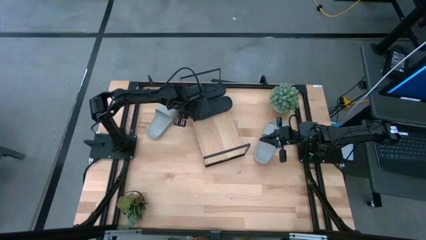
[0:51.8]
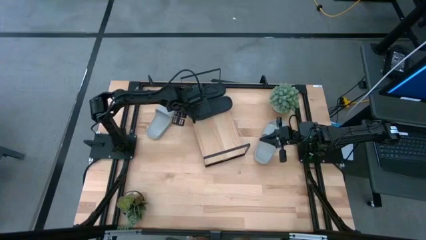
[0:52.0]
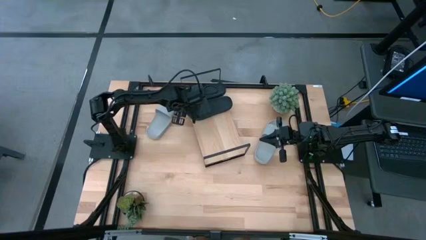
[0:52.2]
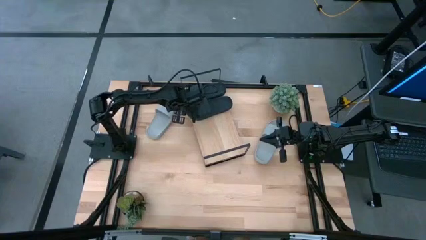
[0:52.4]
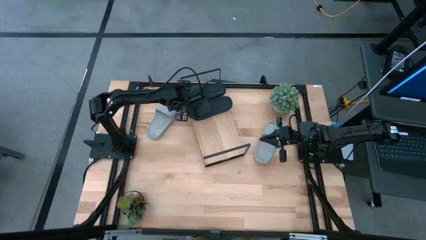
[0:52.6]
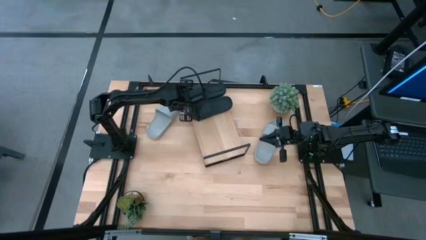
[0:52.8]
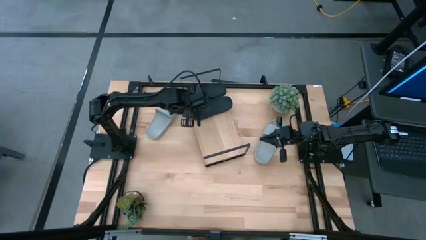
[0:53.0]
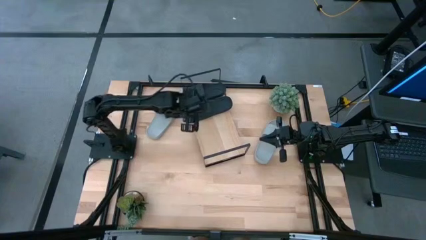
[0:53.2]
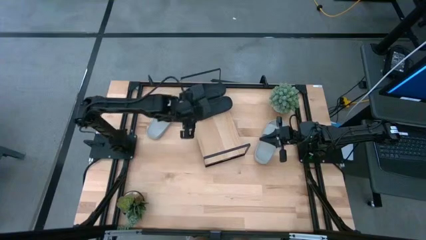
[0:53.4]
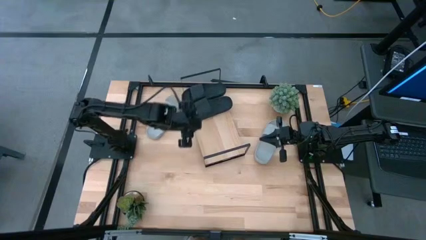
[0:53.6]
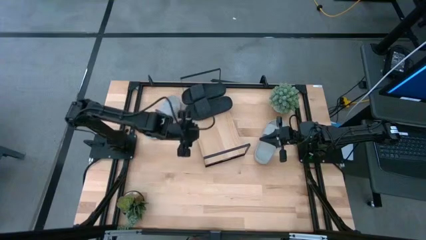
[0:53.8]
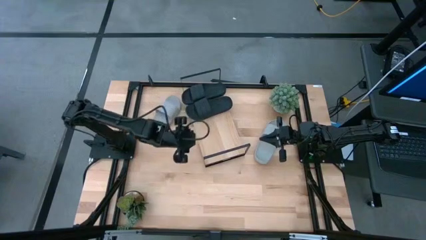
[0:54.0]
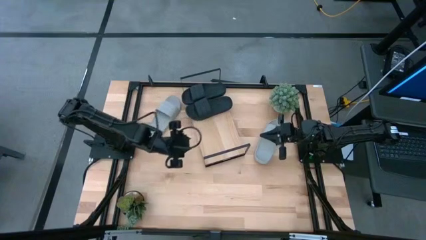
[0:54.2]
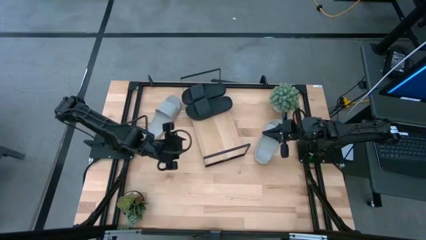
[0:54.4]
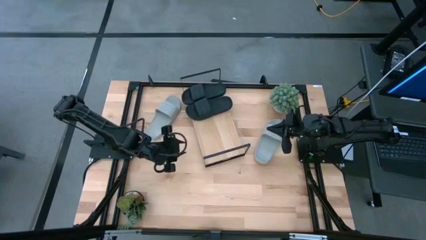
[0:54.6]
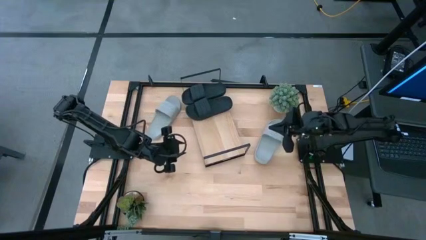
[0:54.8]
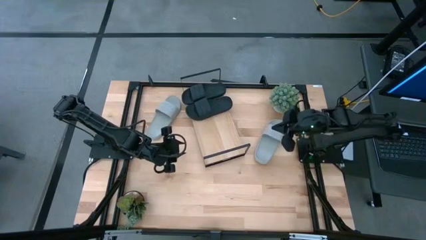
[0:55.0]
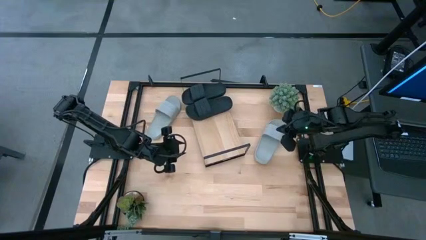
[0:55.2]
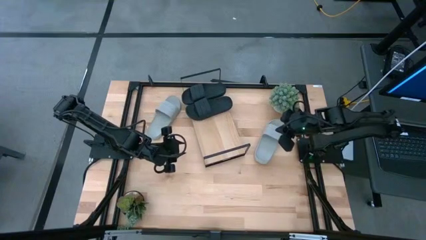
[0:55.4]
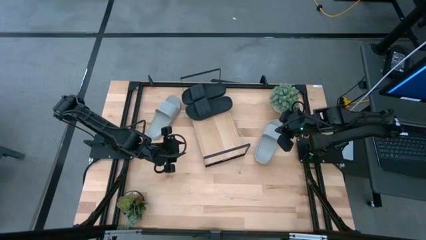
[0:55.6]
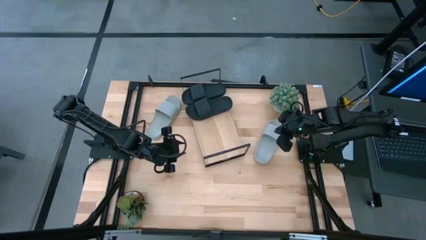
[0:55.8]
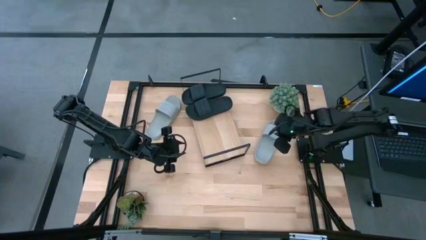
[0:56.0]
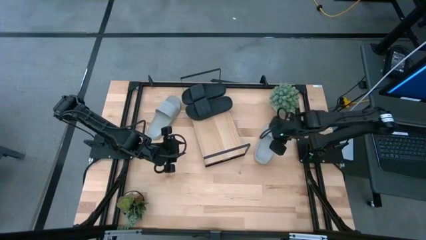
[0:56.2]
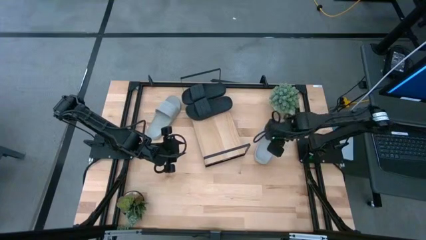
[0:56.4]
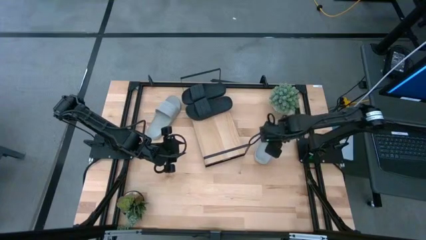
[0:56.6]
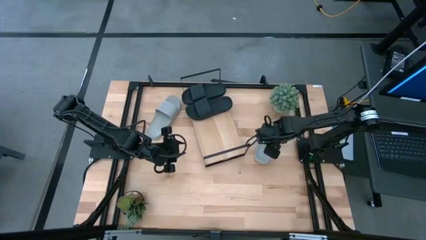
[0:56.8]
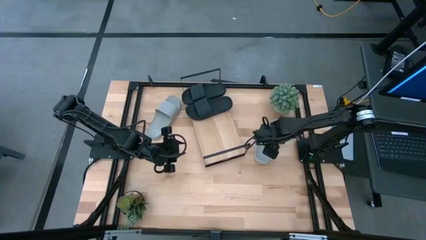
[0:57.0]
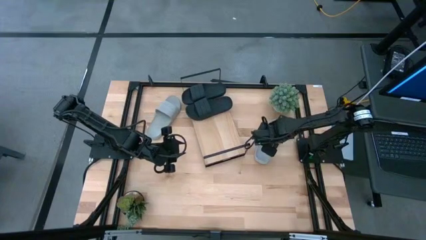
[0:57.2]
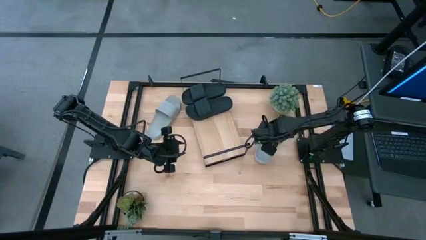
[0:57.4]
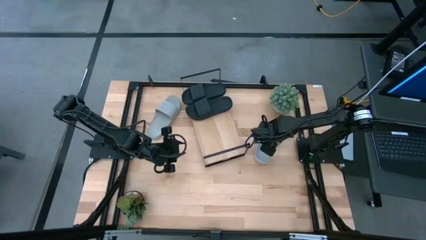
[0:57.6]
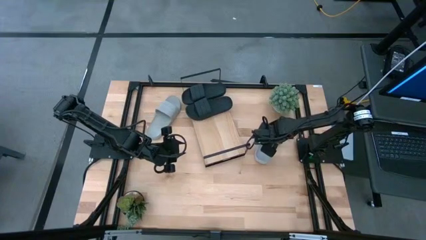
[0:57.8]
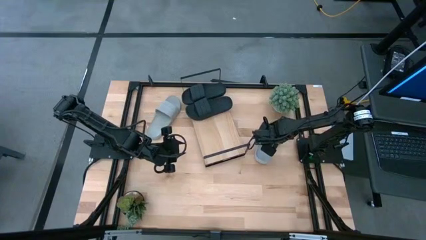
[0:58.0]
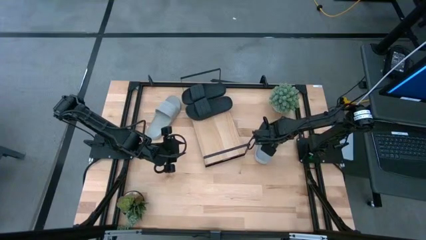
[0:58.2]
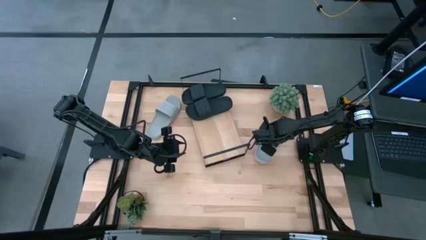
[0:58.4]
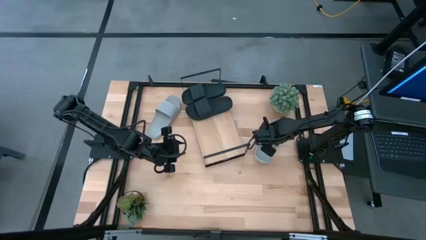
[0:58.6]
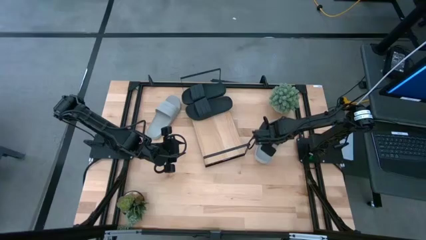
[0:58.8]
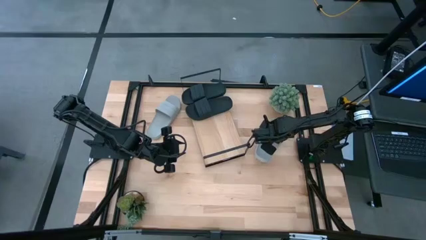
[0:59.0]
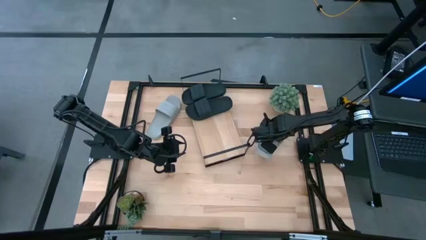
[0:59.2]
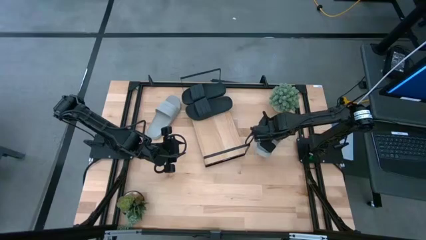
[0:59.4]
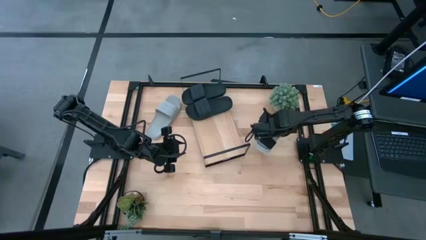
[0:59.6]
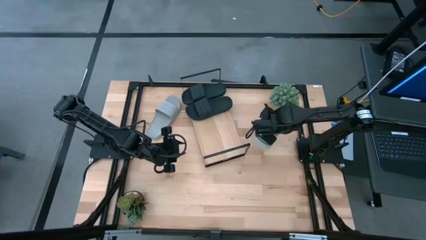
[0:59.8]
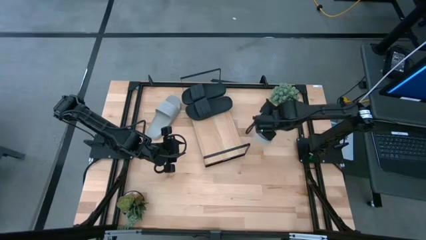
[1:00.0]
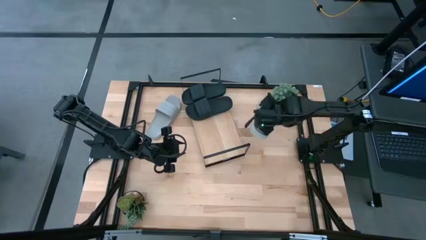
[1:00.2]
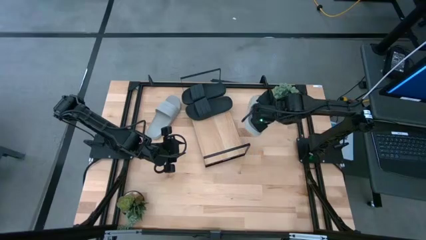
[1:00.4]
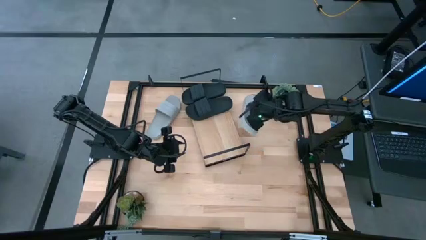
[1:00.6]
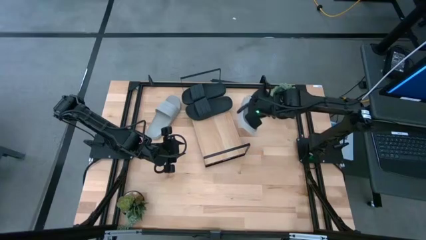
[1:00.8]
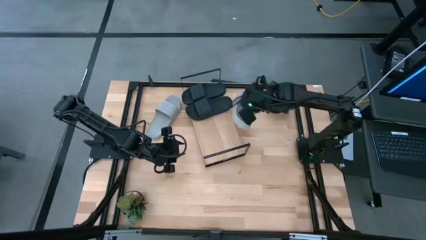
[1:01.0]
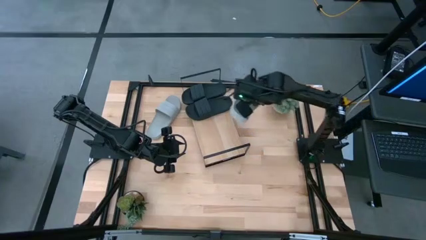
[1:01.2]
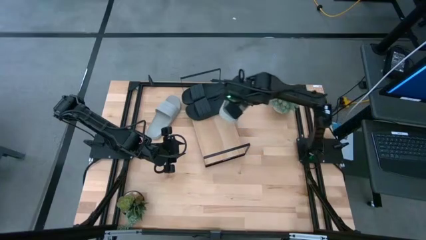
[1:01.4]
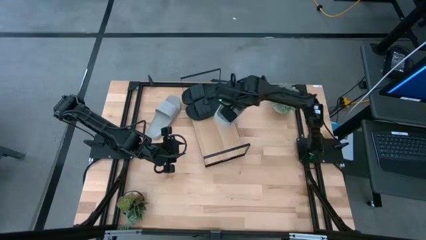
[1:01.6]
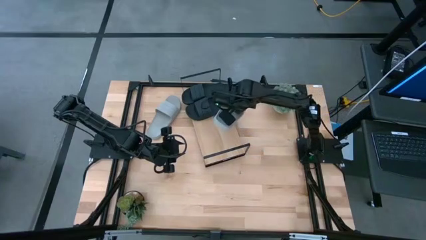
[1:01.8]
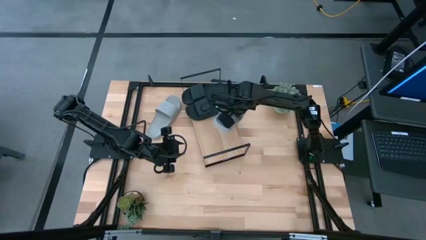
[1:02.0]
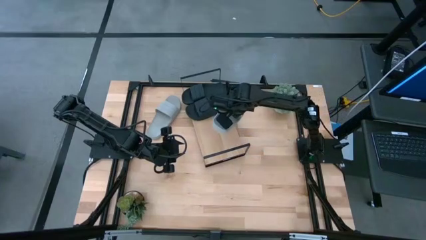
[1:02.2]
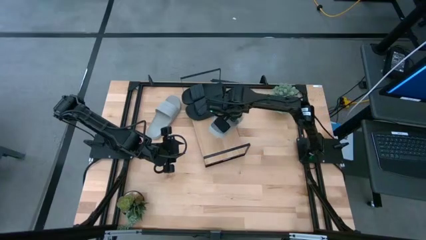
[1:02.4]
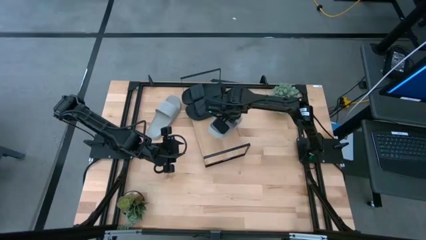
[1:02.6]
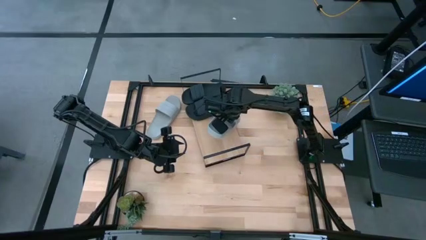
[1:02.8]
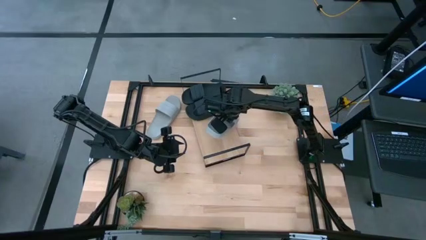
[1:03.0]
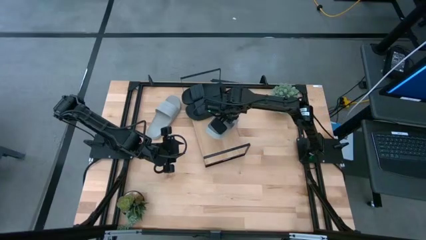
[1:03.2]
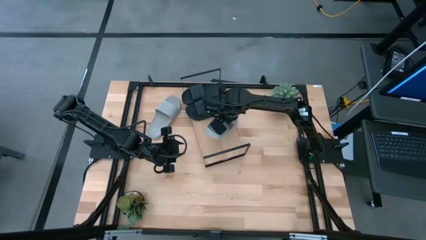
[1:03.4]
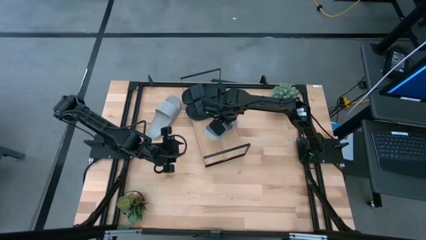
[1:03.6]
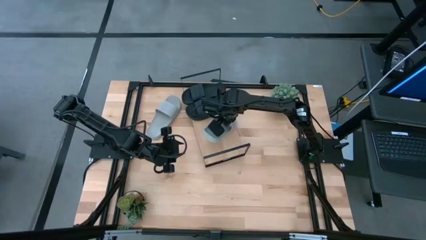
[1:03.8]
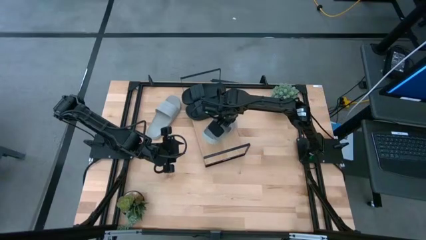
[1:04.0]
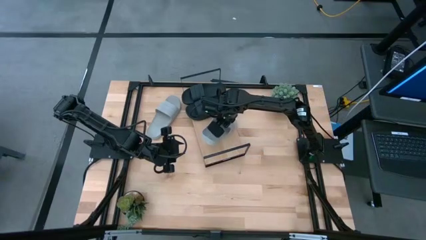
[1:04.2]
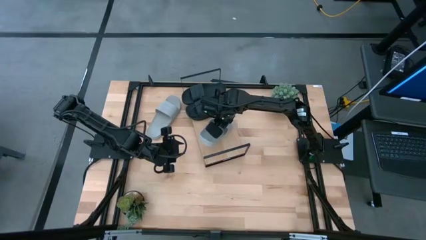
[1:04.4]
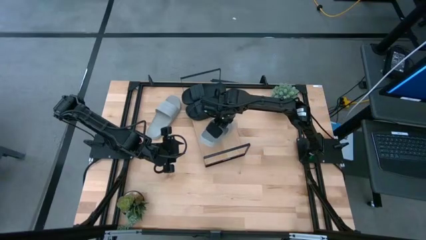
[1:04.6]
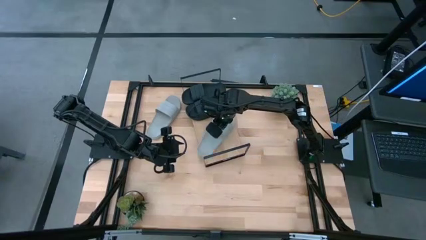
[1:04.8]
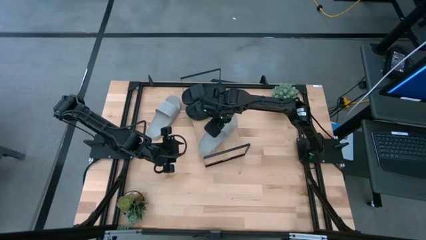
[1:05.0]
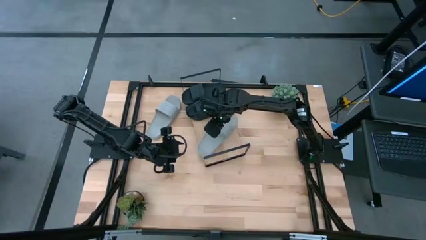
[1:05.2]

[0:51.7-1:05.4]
Task: Pick and place slides into the shelf
Put the right gray slide on the shelf

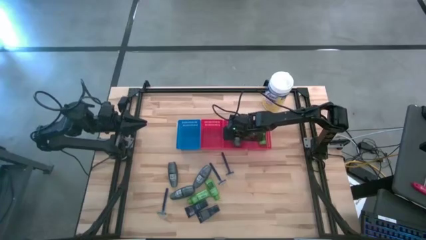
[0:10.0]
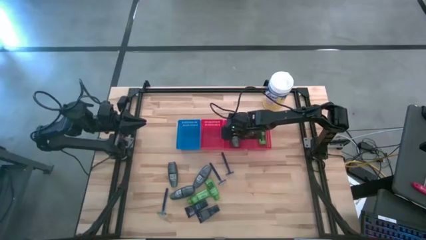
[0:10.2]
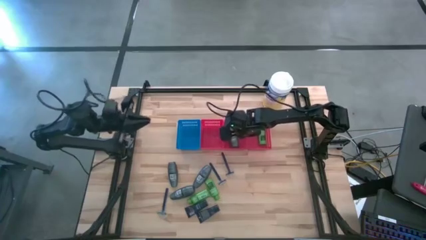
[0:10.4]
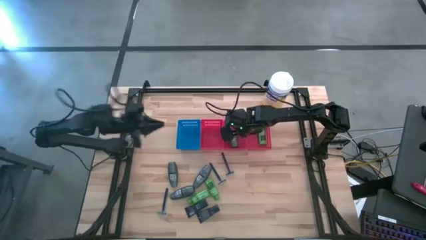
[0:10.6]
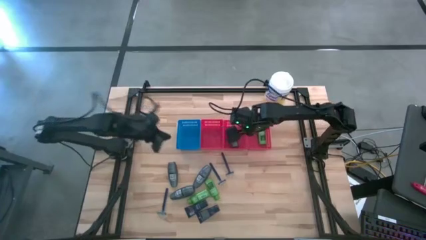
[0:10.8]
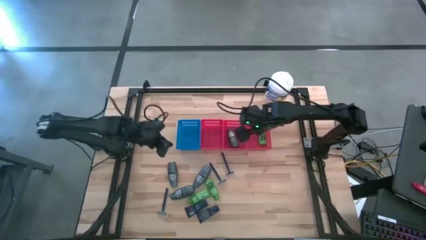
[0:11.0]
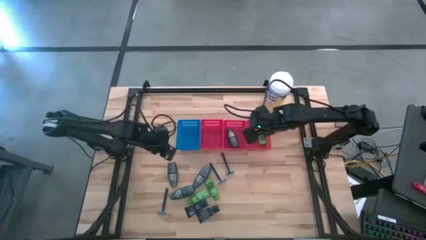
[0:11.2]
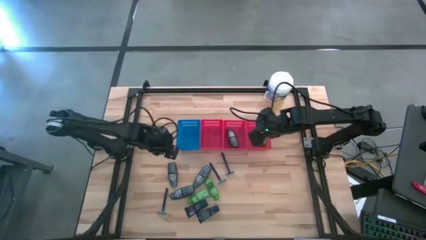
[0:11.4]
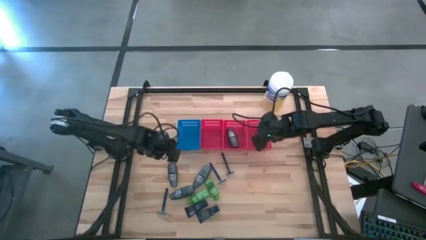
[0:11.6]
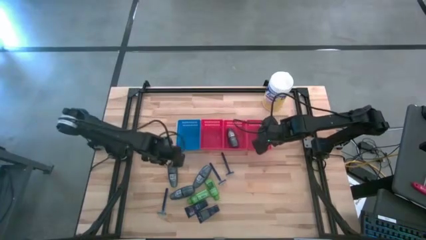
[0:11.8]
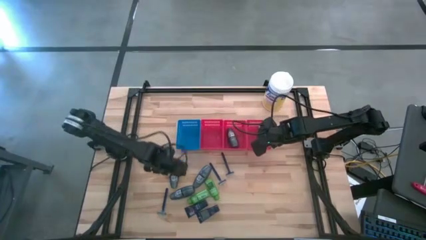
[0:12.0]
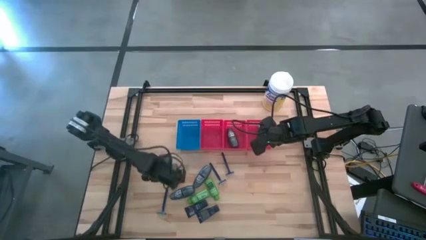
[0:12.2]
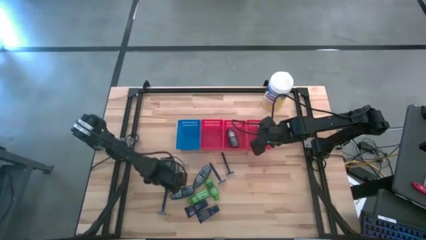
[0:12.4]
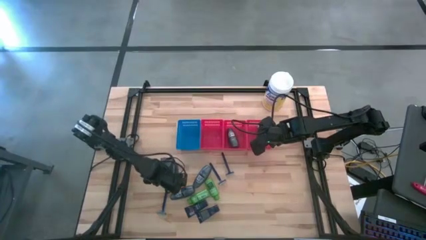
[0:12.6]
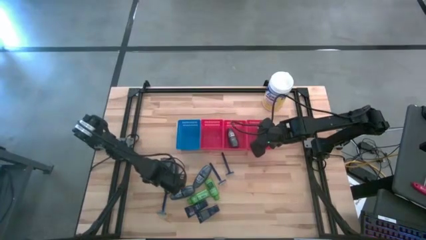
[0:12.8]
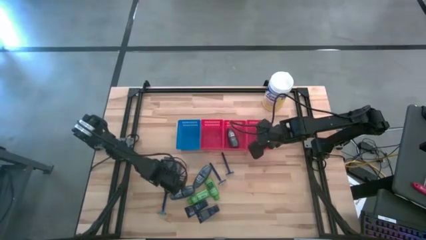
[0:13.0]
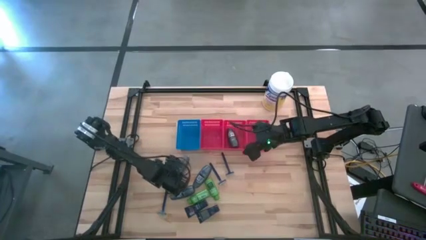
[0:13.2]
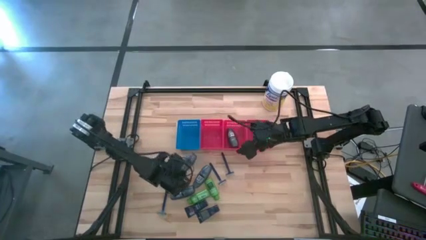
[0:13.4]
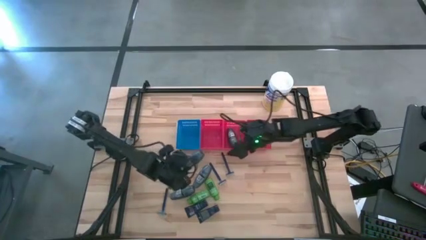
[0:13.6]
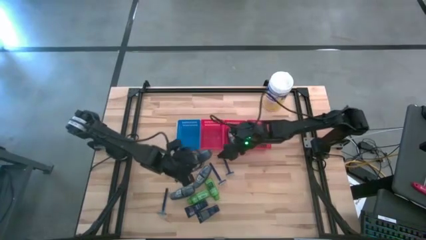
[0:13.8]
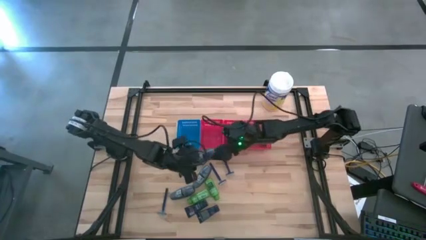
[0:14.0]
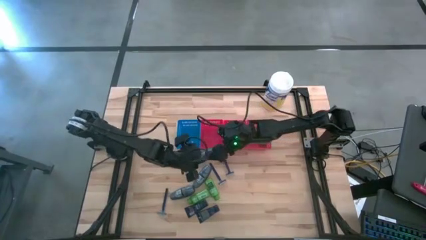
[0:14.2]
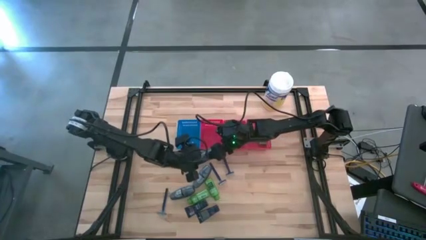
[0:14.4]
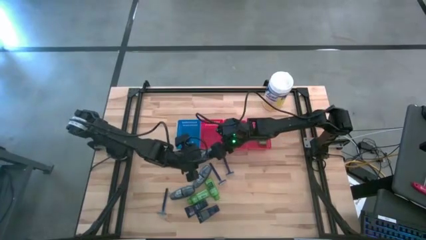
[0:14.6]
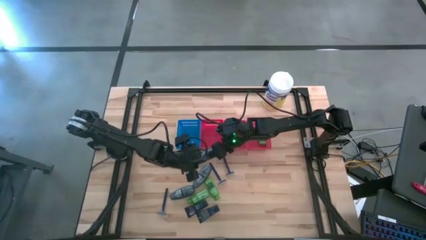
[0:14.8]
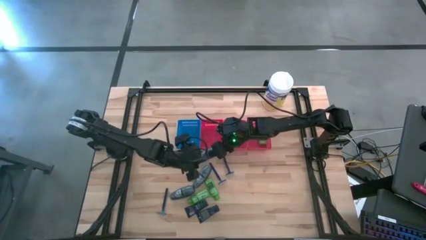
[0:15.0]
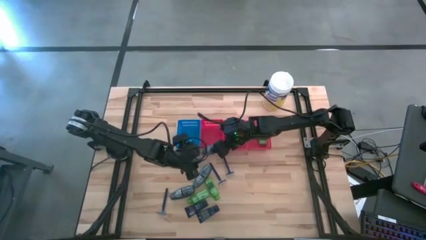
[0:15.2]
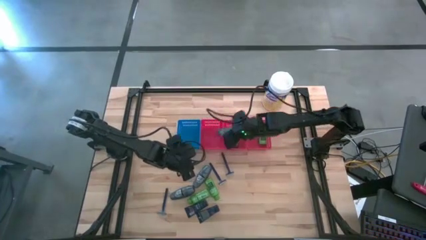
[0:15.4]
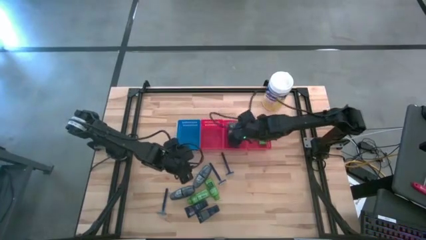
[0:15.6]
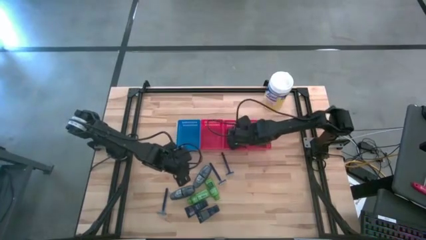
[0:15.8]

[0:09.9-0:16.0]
Task: Pick & Place Travel size toiletries
Put the gray deodorant into the middle red bin
